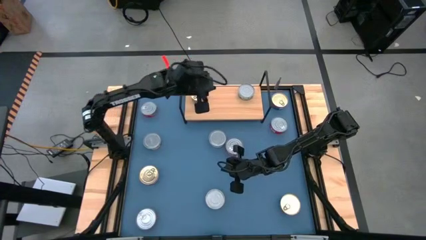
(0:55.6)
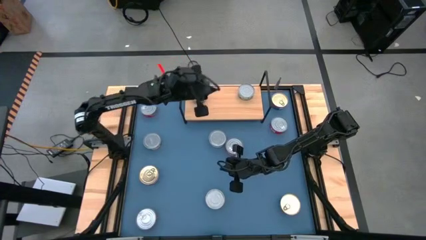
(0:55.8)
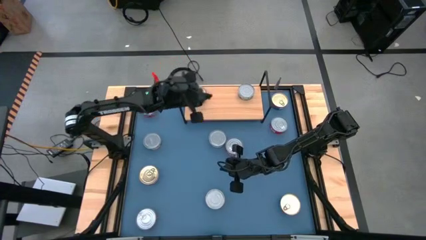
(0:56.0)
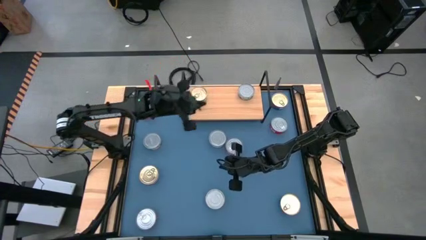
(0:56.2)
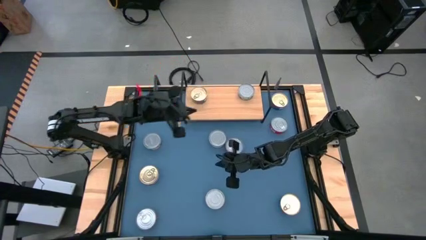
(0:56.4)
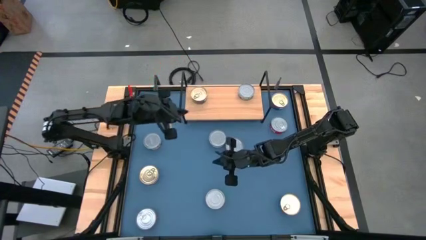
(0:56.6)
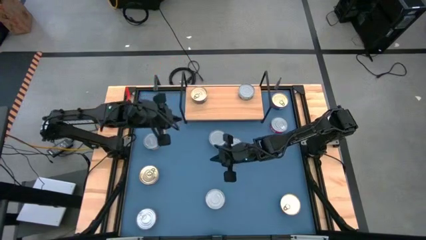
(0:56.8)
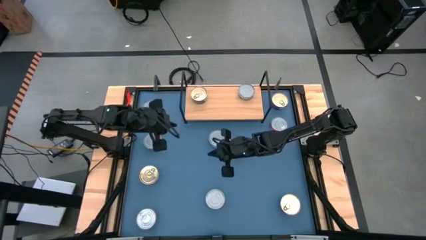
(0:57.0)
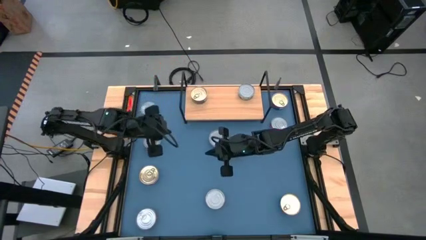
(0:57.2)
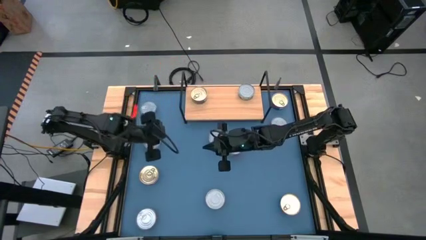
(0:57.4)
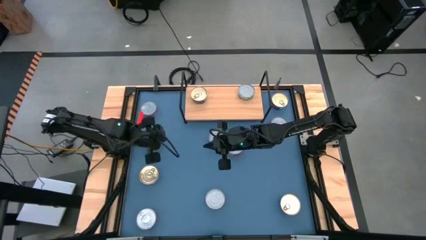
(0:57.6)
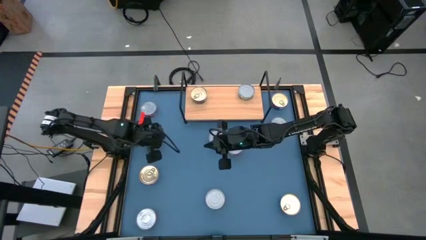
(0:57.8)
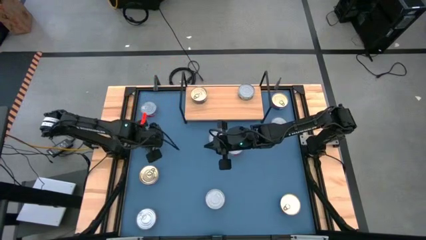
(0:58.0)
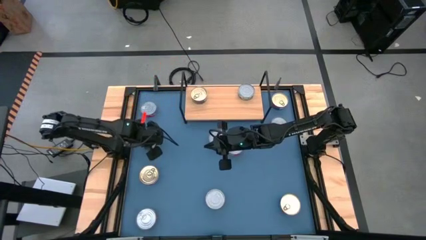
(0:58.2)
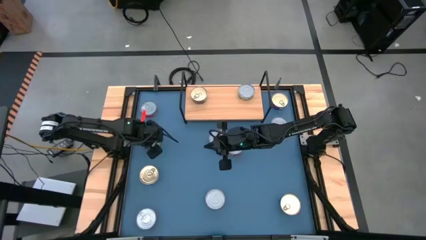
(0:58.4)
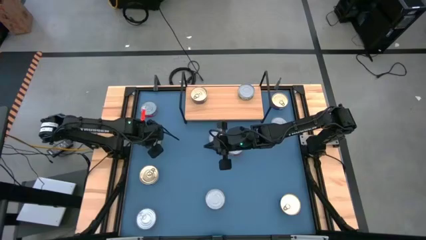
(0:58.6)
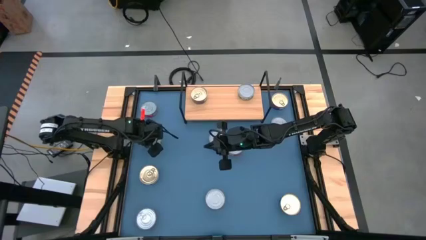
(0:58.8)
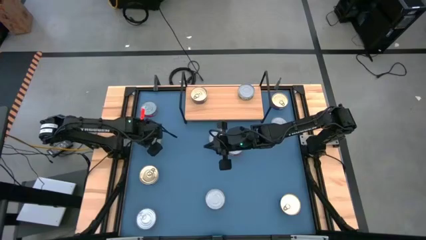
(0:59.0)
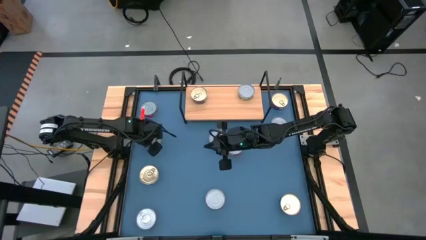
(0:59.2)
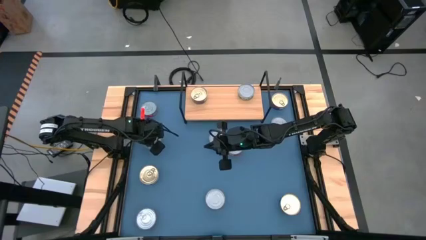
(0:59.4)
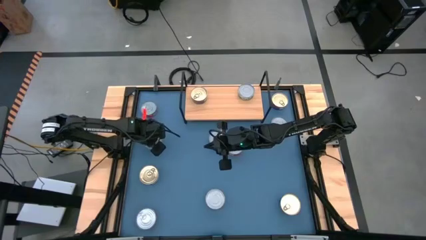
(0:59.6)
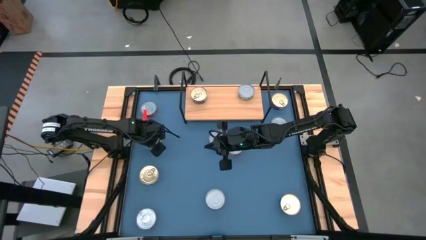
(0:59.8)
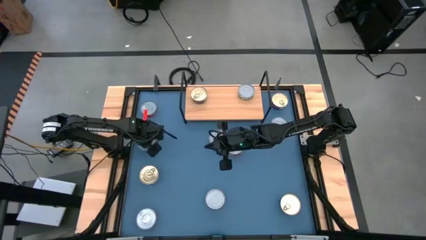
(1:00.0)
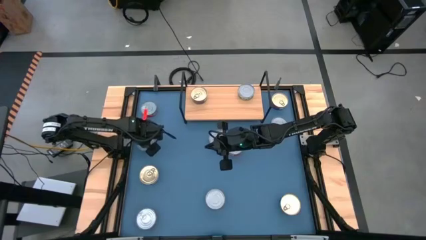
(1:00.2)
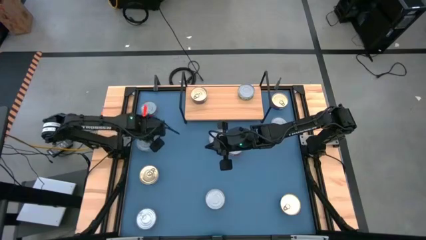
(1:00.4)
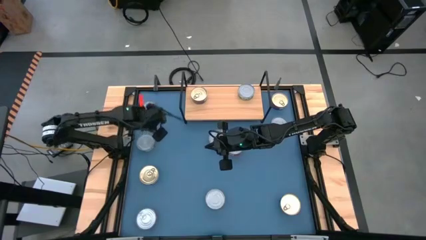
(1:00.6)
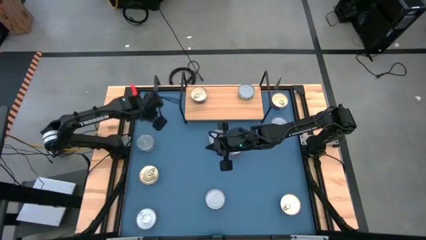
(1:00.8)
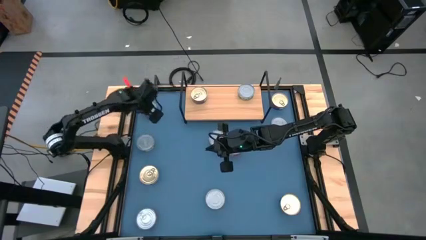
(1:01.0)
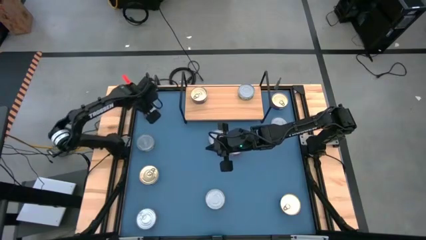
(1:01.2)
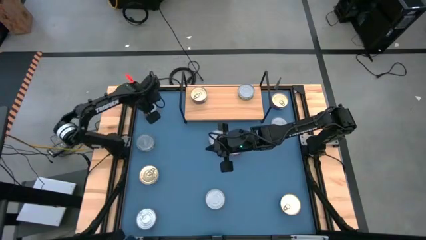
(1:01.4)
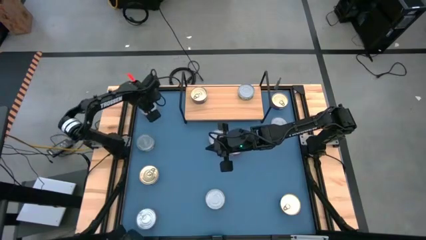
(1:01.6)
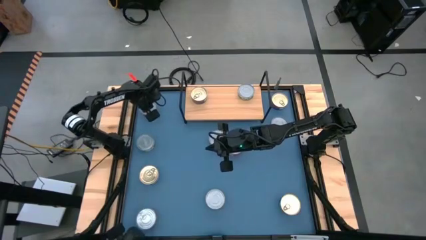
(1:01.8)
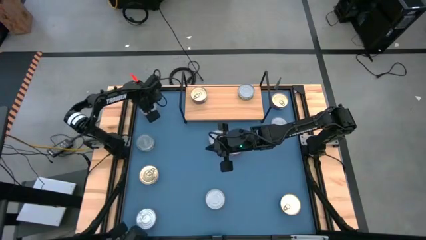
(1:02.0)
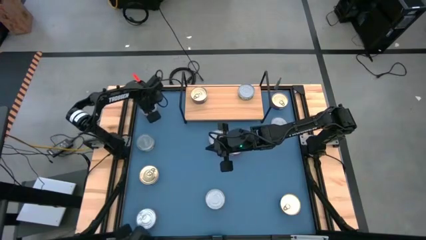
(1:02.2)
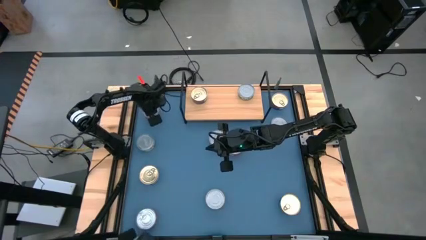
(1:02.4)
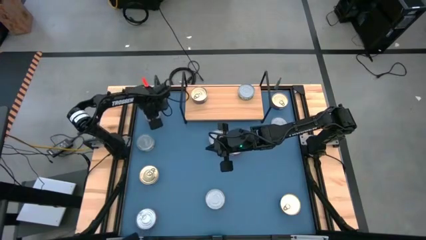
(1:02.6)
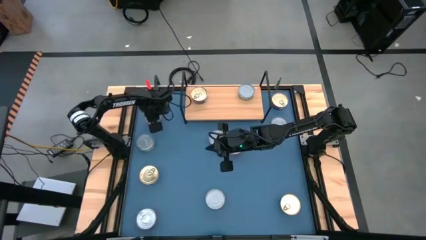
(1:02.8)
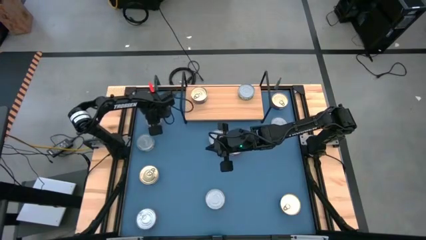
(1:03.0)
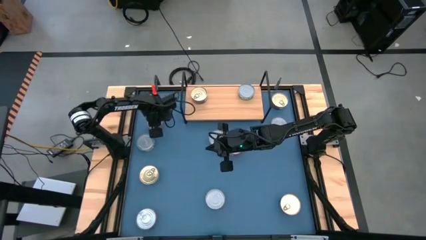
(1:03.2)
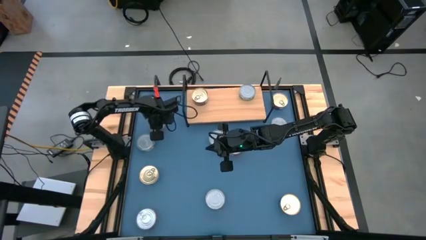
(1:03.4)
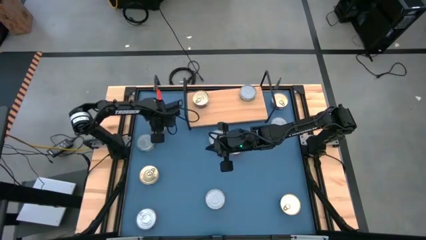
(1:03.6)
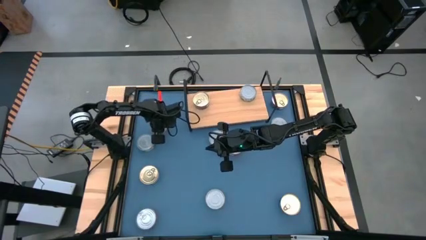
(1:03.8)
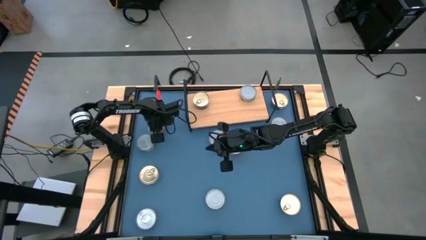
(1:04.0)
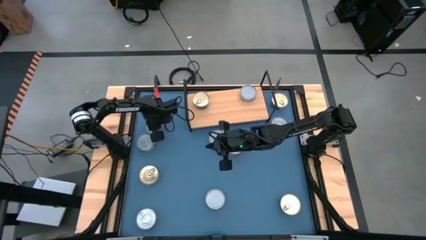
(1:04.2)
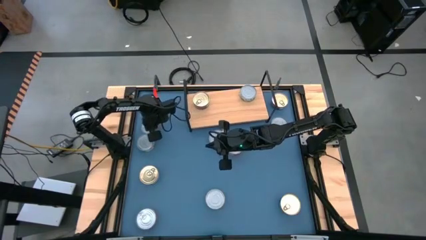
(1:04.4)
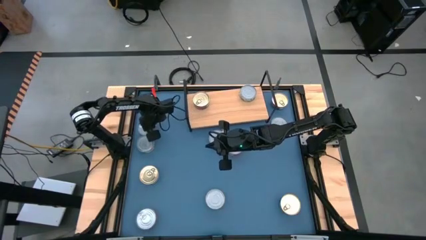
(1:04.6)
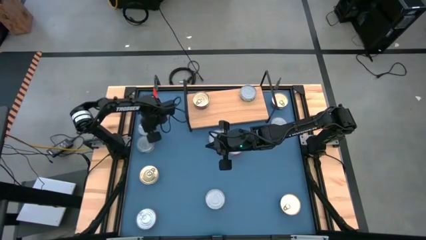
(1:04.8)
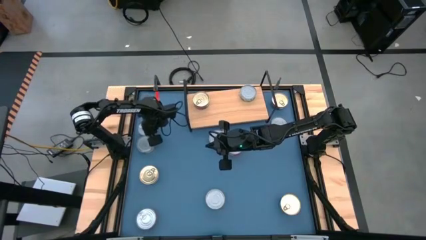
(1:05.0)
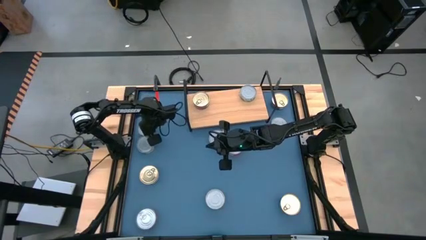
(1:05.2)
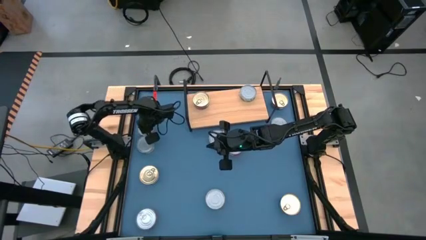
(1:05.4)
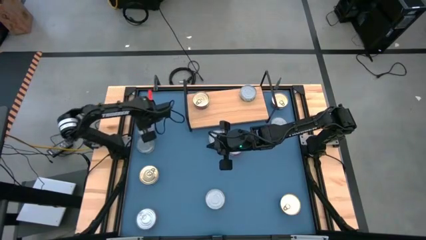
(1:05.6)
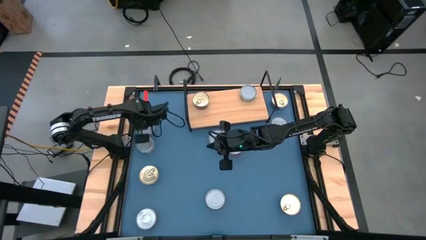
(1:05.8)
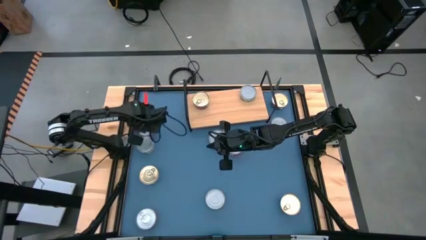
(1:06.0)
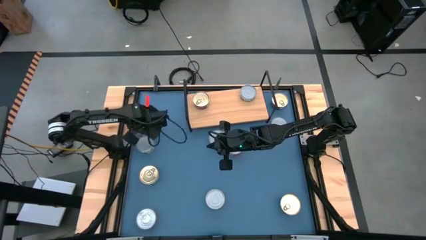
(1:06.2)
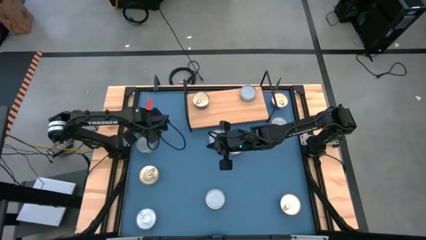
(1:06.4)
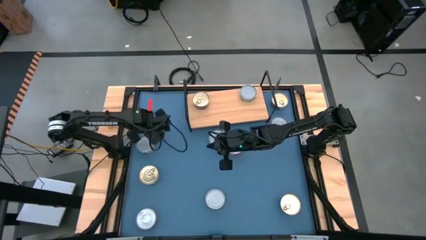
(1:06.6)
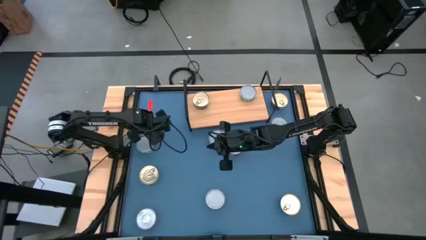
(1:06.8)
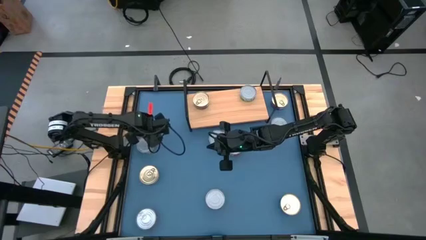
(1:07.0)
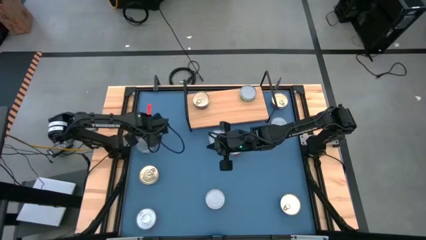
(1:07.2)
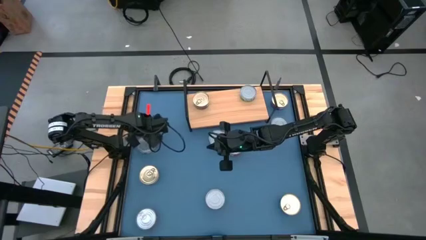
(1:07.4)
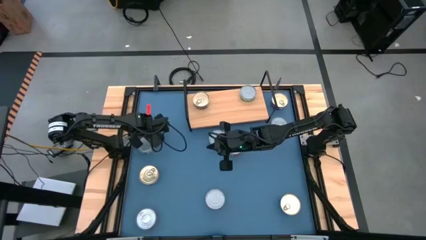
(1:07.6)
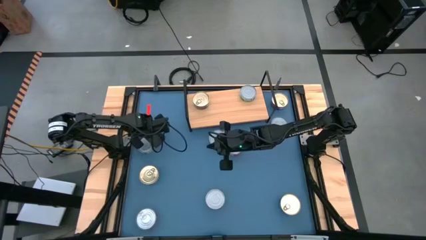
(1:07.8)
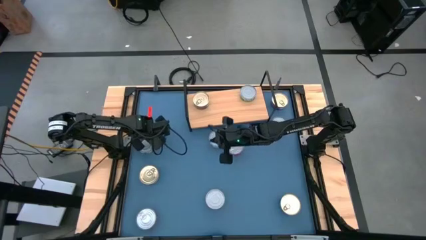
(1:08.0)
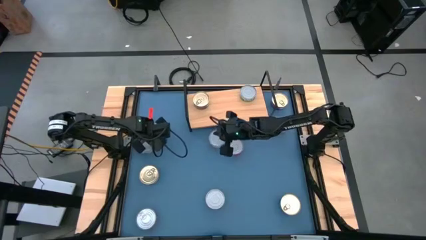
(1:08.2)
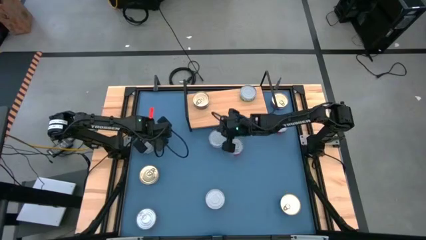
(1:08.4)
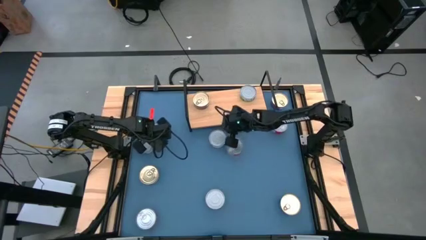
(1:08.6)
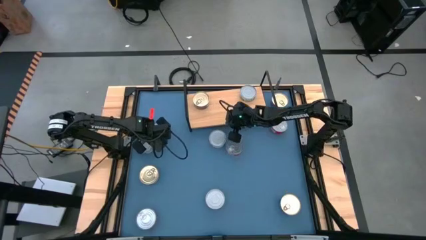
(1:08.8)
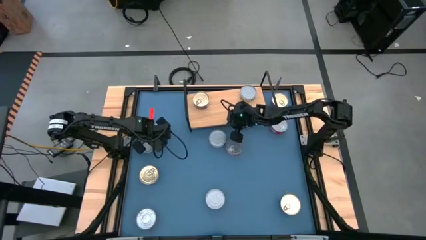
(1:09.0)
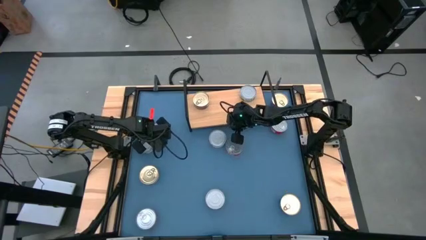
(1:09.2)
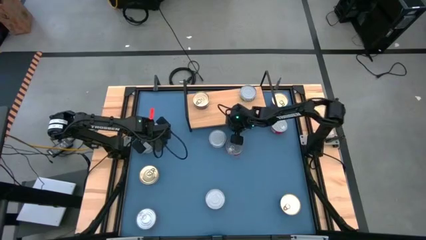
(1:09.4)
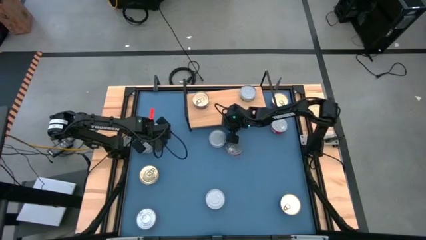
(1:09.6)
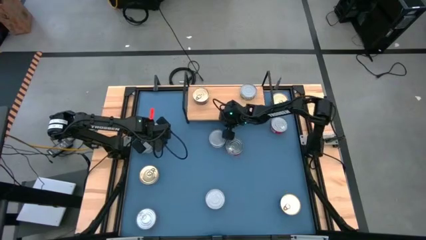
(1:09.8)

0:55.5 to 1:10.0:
Task: Stack canned seafood by type on shelf
Put the red tuna can on the shelf

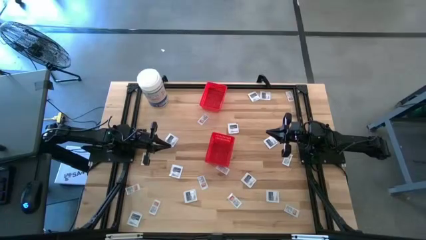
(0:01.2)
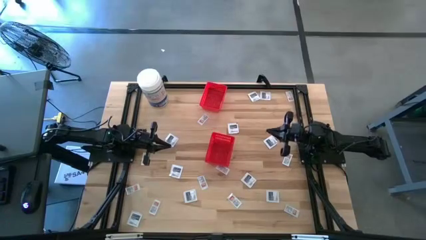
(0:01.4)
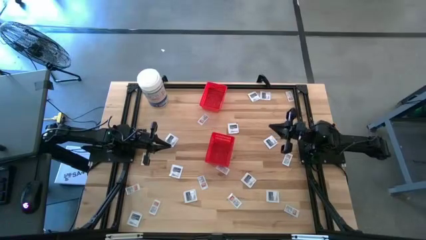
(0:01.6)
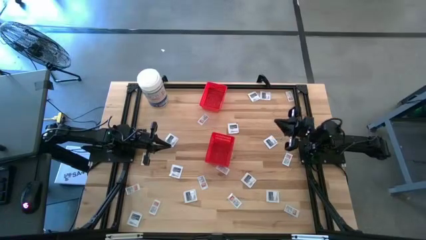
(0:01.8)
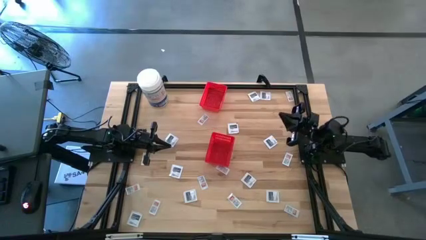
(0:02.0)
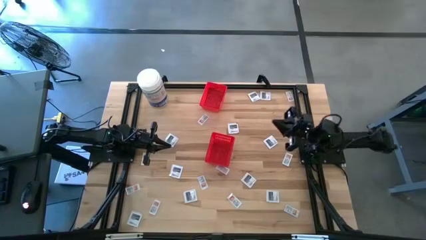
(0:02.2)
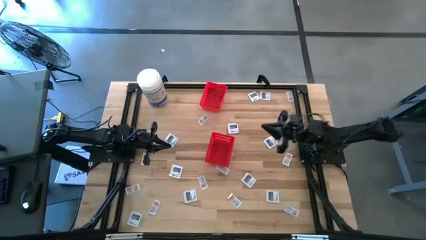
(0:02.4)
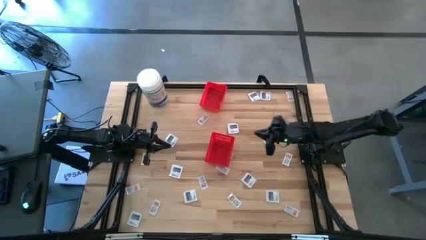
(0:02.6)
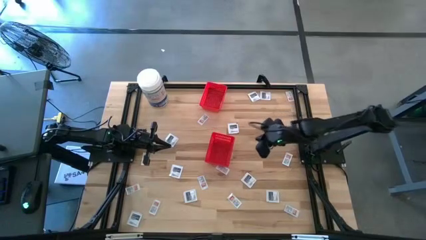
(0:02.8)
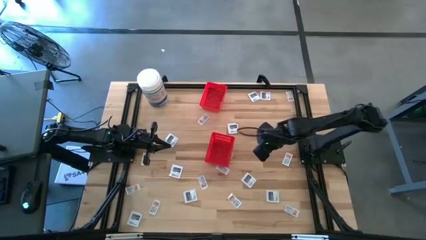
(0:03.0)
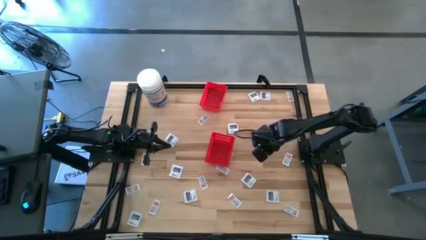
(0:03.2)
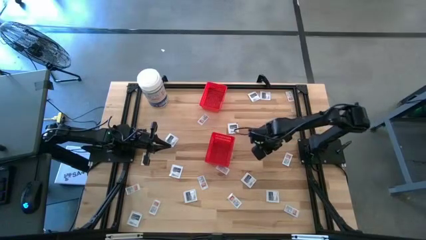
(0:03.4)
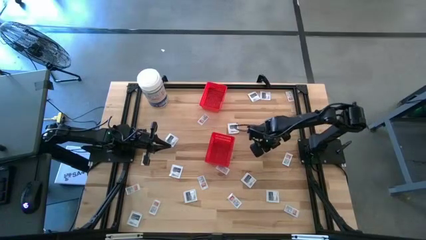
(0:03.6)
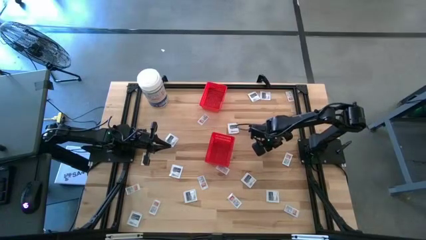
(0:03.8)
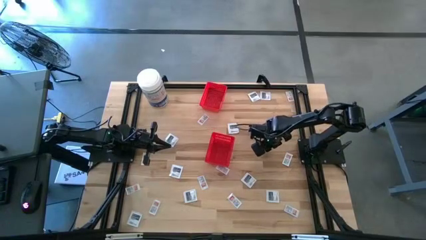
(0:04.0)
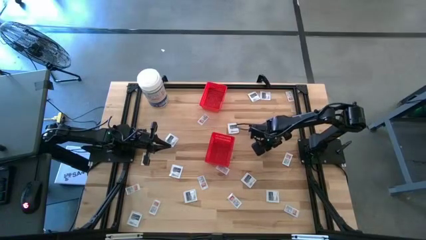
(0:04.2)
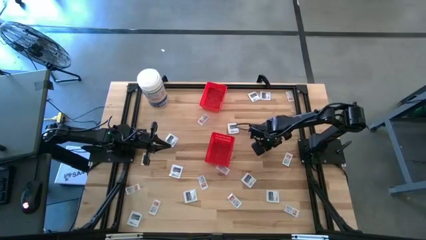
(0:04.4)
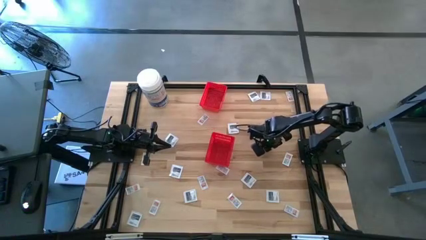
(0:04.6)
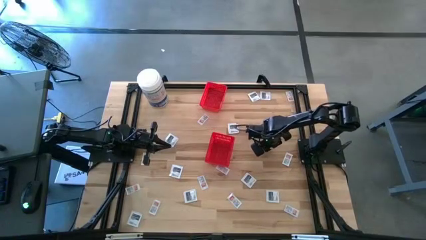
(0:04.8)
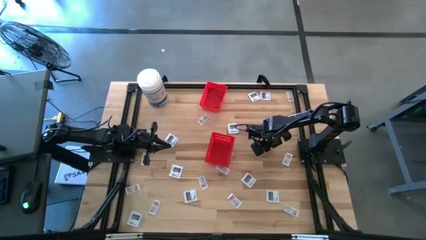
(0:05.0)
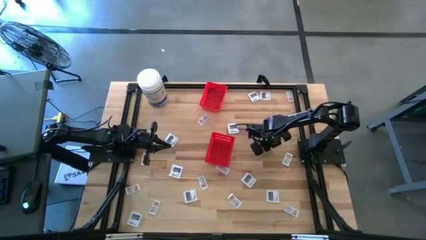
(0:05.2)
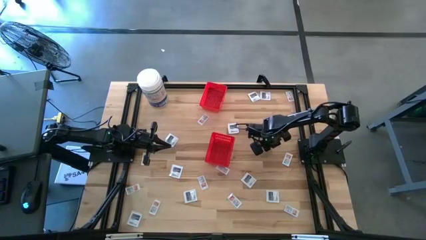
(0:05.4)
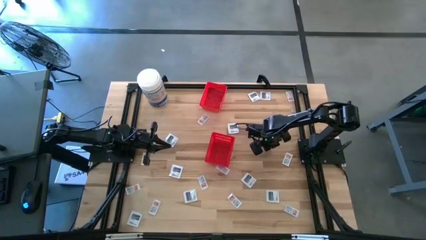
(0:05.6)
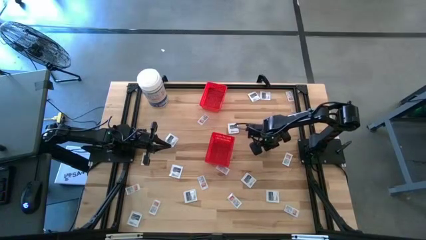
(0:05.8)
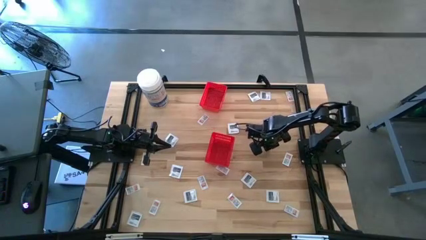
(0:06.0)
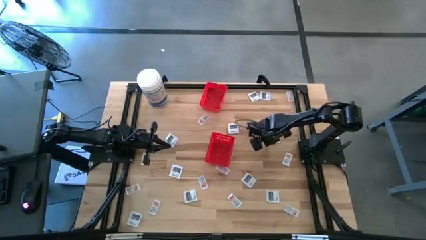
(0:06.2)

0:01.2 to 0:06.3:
Task: Pick & Place First Aid Supplies
Put the white towelette pack into the bottom red bin
